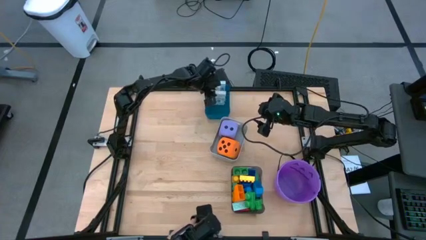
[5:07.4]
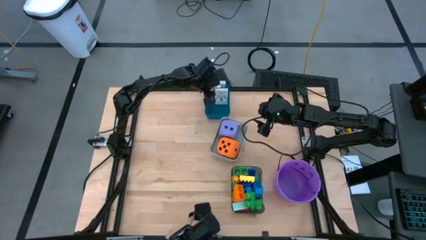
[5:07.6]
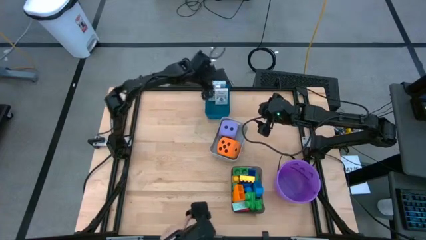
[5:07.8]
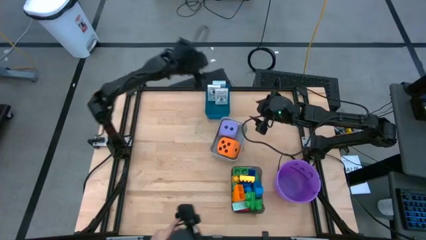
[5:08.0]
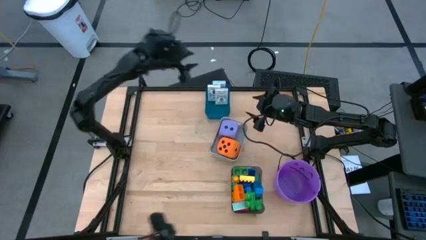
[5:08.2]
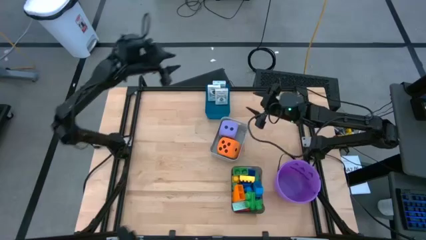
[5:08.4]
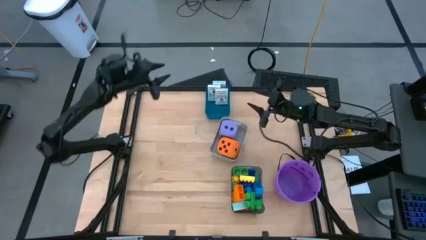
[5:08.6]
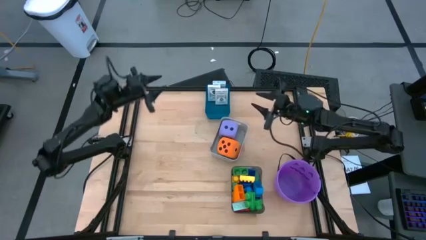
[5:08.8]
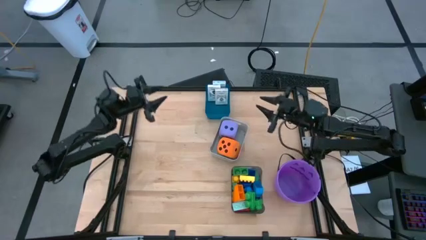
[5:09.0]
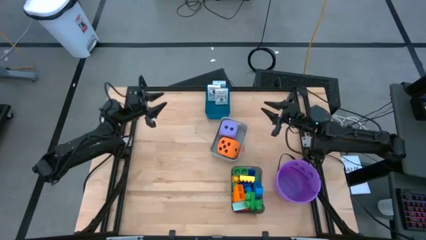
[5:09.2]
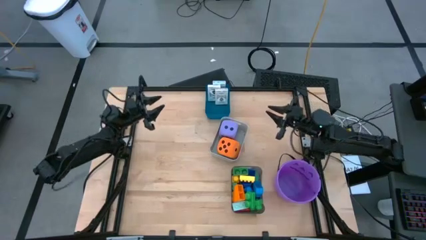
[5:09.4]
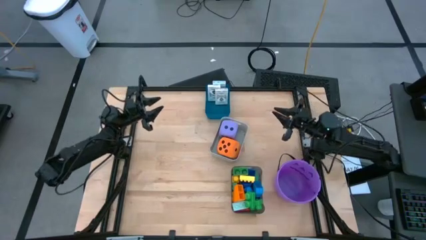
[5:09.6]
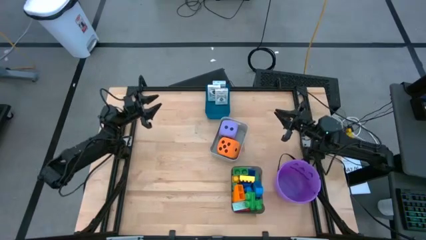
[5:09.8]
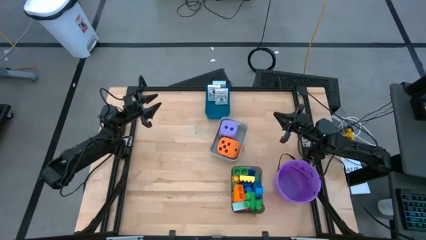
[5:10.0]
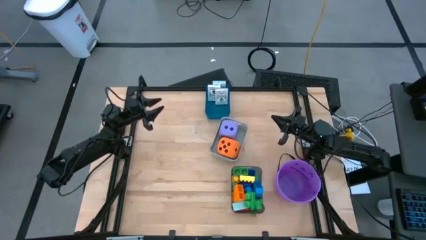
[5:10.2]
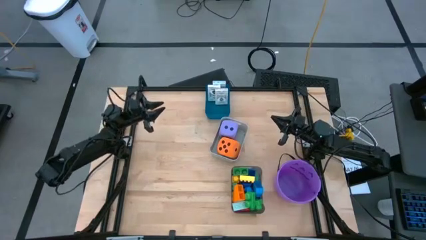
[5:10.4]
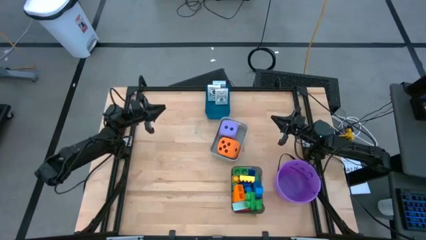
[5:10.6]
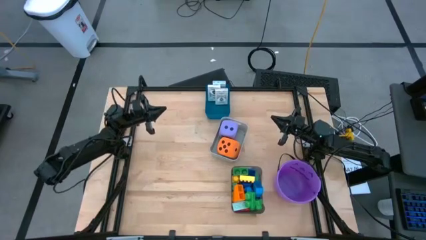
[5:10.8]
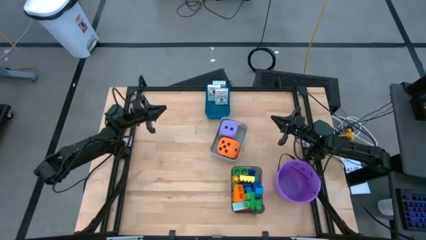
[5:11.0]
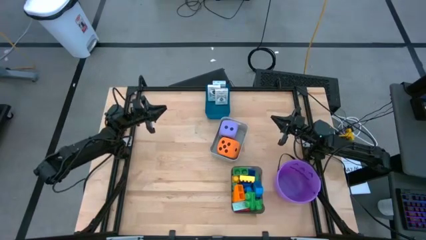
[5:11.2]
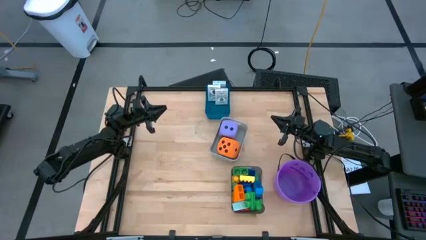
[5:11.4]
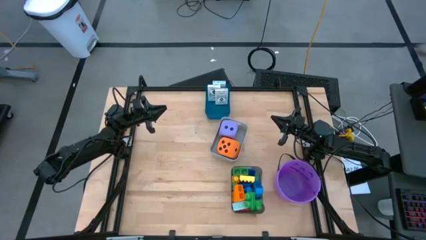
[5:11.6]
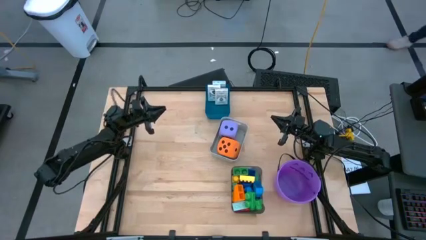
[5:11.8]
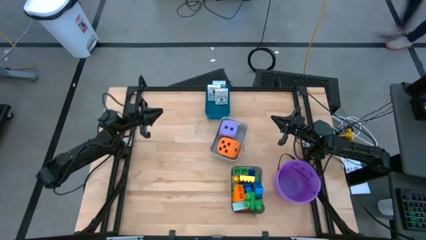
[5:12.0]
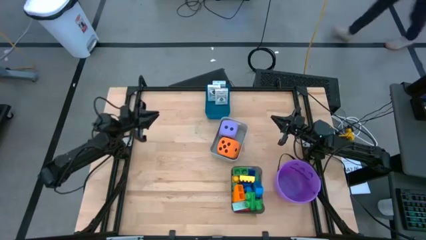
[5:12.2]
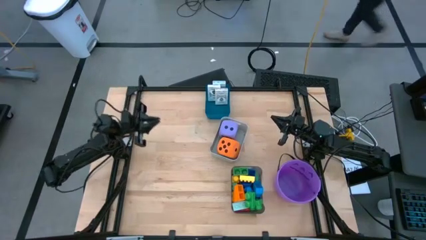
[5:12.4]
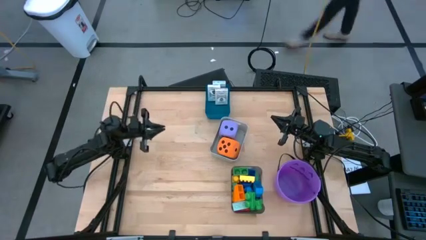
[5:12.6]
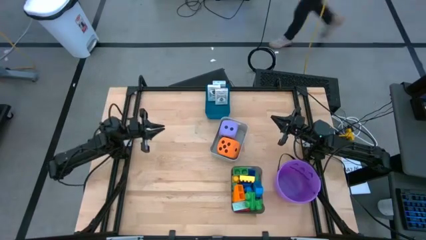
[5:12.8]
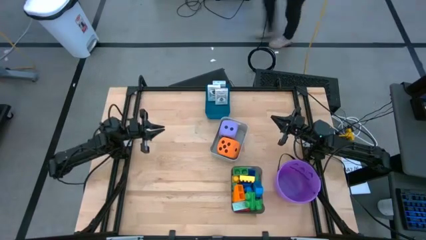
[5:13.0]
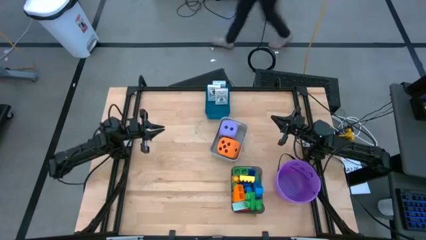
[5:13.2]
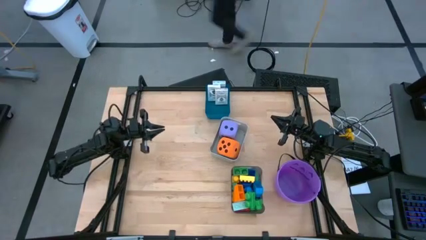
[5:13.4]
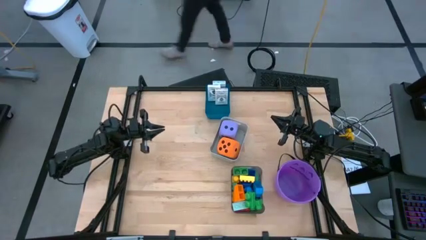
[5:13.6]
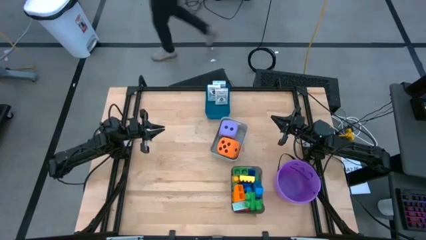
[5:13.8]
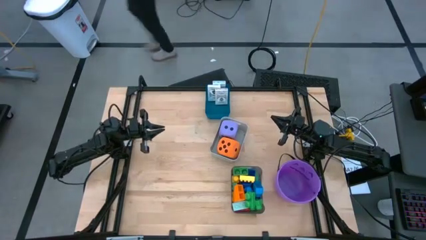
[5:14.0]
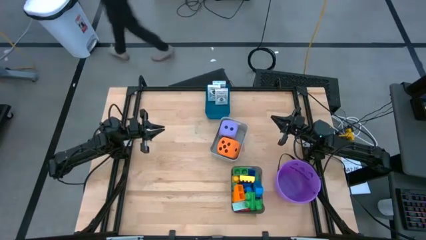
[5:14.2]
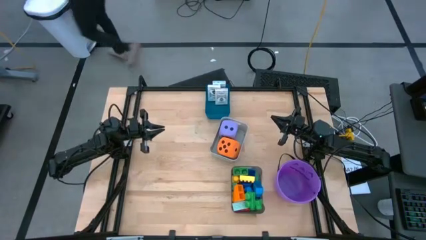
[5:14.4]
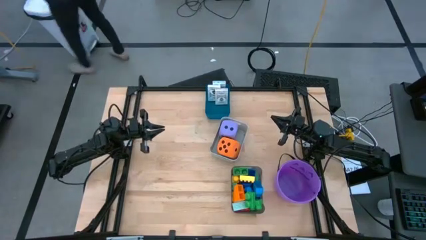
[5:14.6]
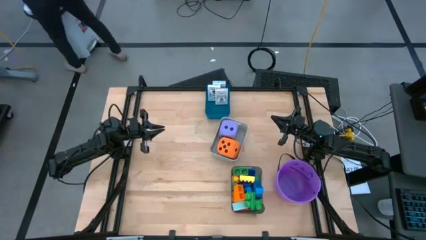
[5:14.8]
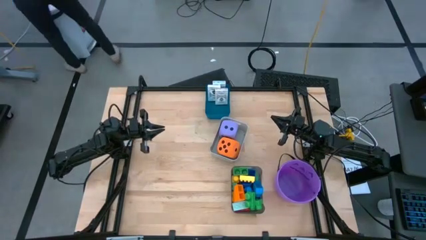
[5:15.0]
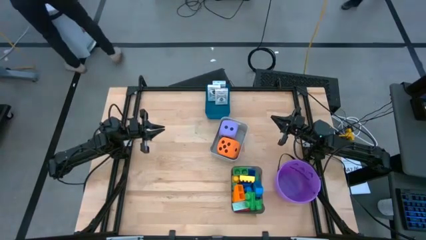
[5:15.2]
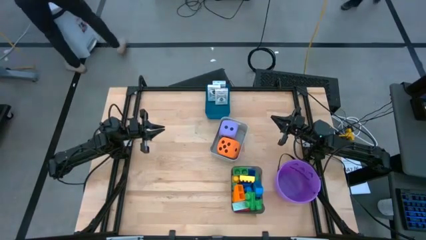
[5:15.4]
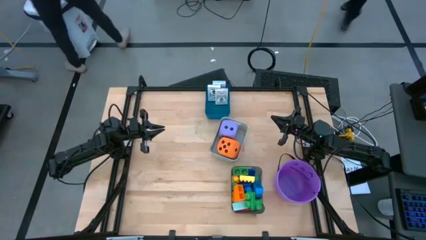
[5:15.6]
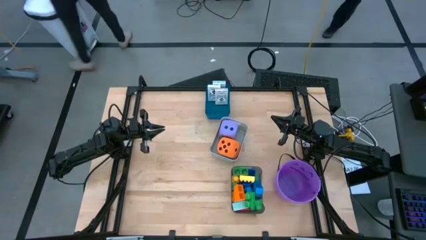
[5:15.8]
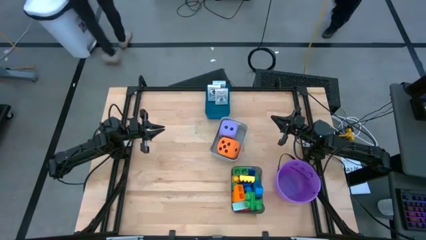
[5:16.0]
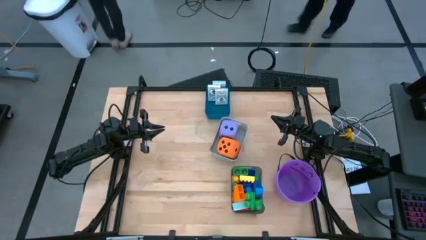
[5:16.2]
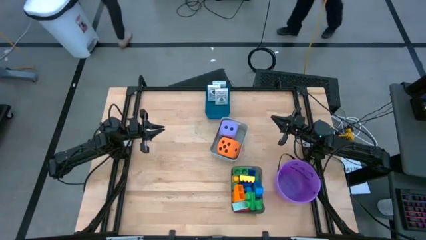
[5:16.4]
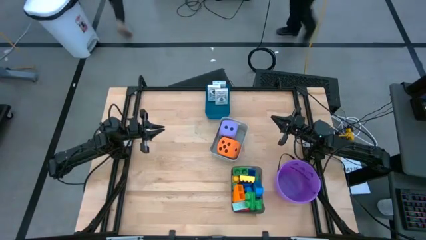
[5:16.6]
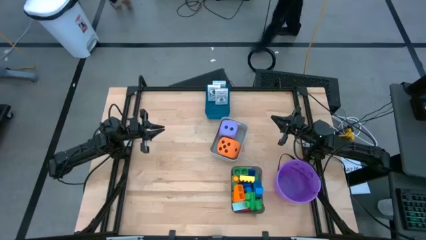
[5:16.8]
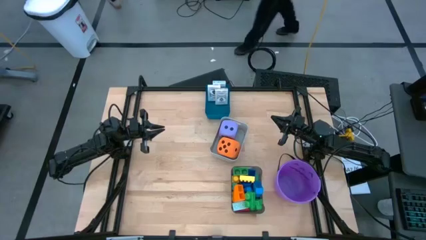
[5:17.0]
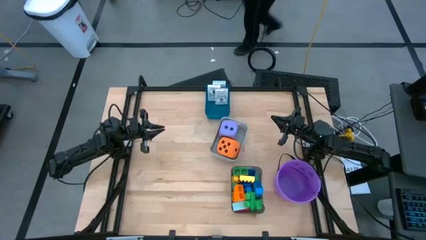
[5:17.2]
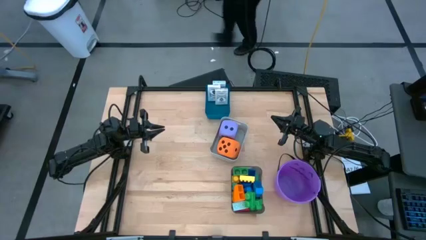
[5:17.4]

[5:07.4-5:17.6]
Task: Pick & Place Toys
Return to Home Position

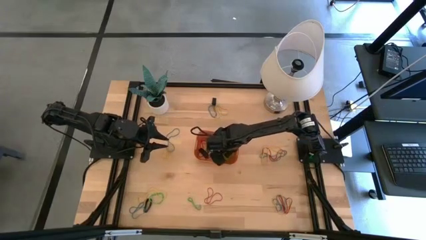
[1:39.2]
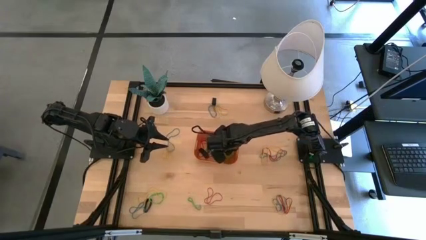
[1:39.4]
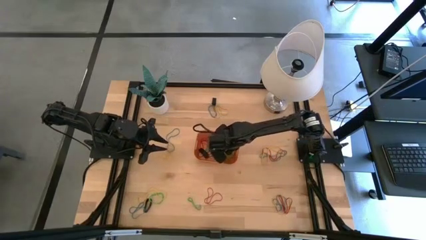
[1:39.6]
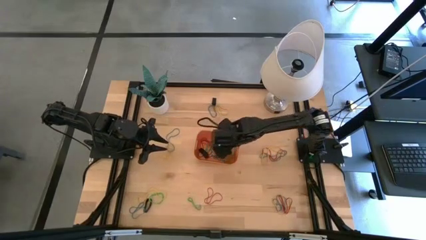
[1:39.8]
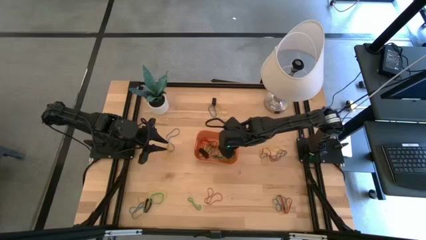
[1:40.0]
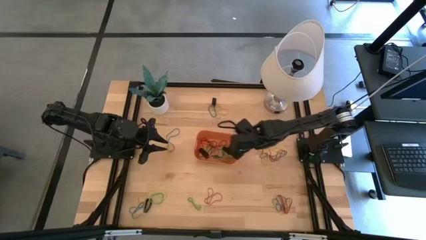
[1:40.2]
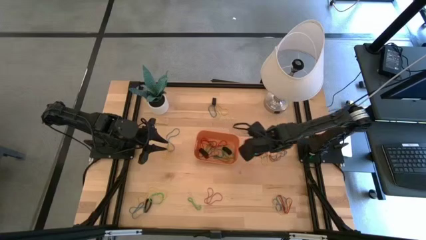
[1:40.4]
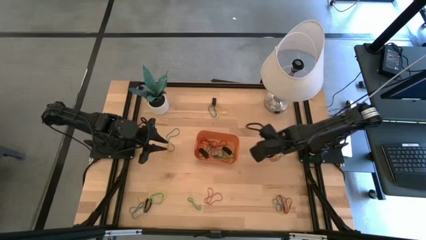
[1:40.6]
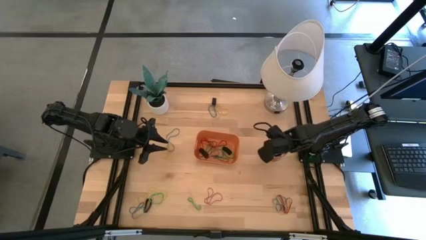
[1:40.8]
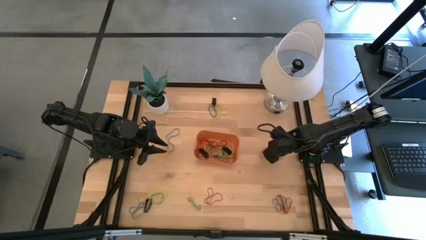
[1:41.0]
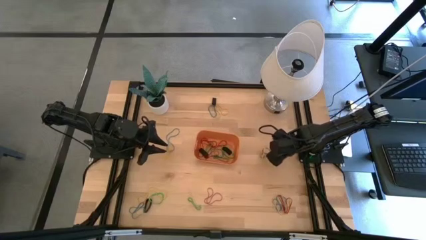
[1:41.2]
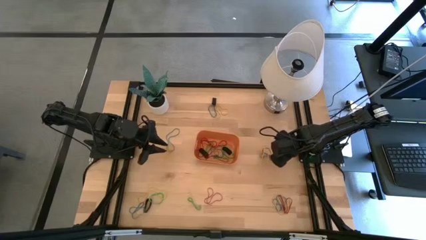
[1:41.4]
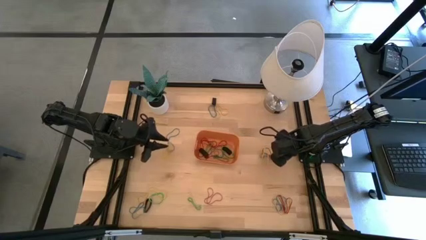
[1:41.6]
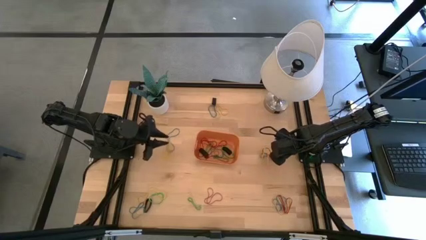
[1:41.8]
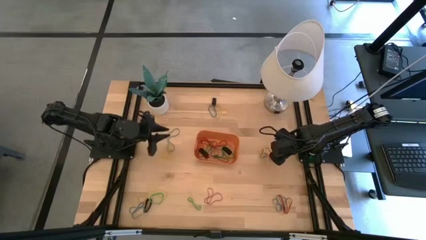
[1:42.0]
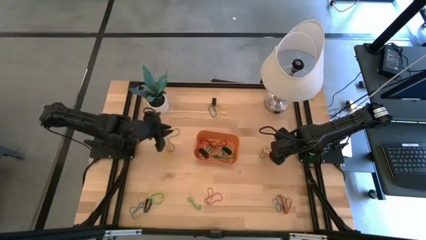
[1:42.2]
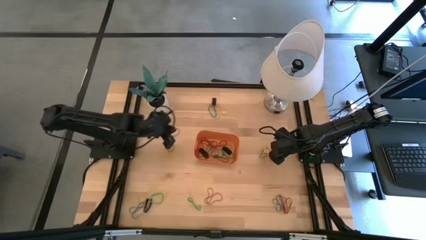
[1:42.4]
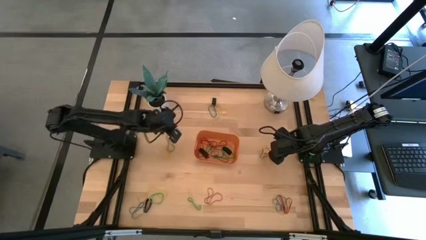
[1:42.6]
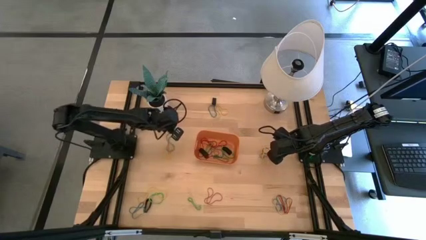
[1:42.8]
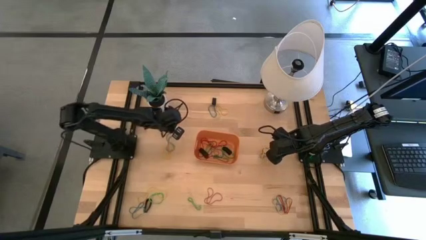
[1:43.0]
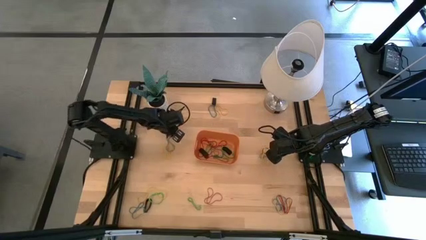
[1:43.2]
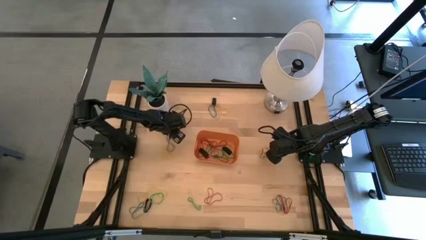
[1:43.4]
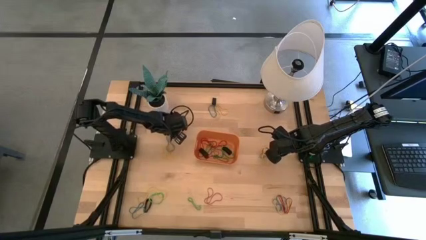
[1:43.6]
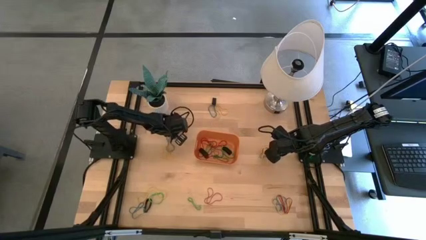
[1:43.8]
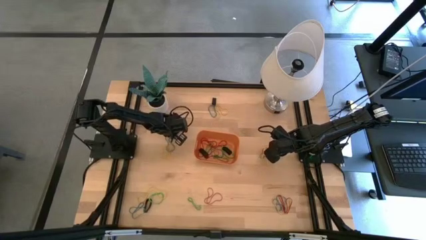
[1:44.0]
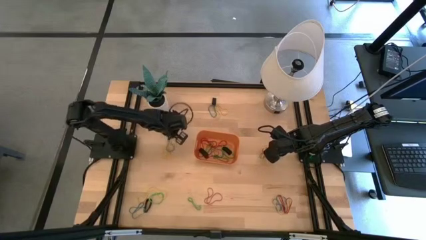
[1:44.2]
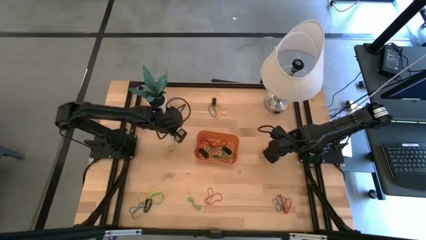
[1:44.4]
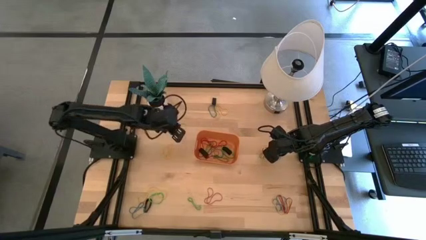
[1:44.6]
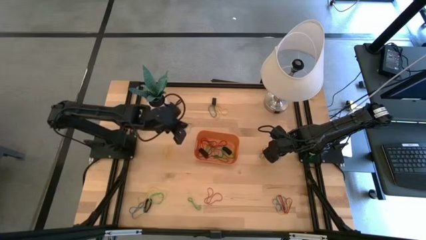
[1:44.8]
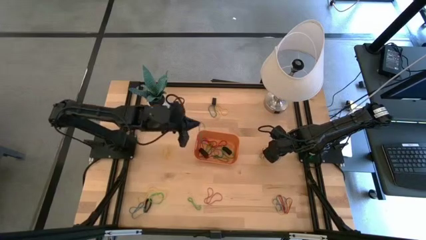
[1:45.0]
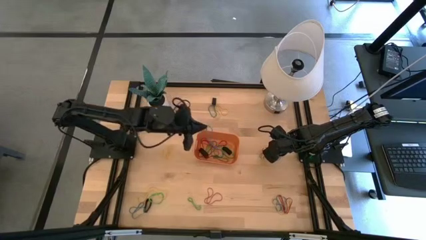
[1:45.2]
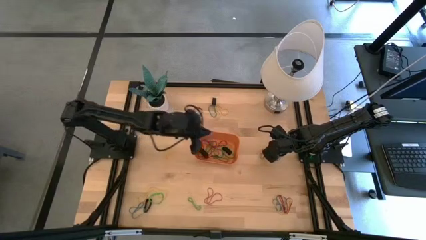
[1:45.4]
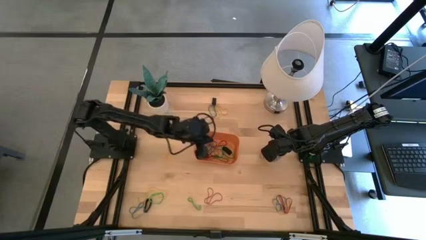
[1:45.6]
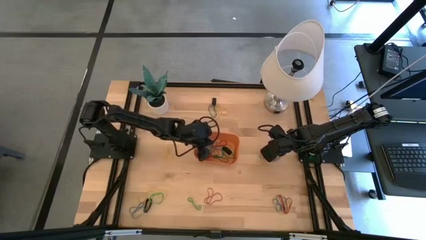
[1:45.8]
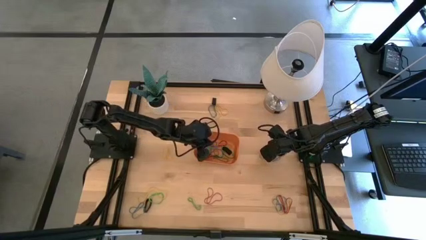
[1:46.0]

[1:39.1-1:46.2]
Task: Pick and place rubber bands into bin
Put the blue rubber band into the orange bin
